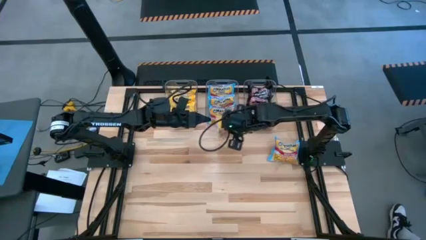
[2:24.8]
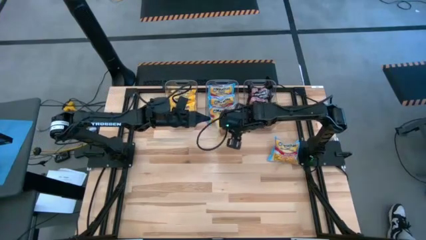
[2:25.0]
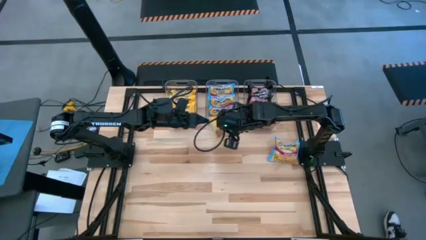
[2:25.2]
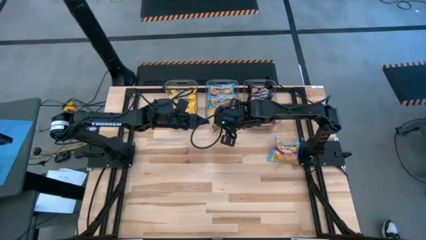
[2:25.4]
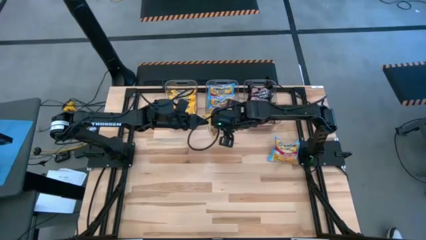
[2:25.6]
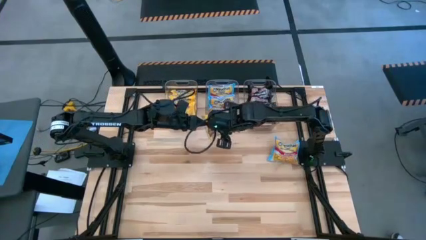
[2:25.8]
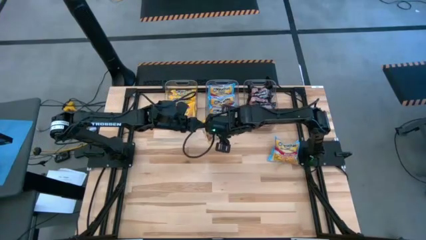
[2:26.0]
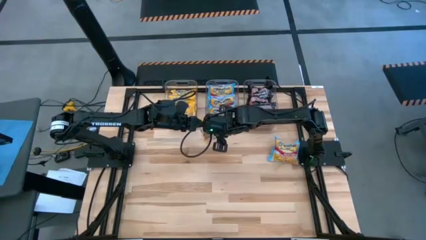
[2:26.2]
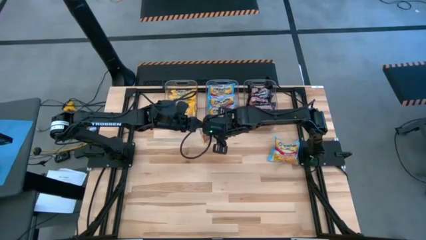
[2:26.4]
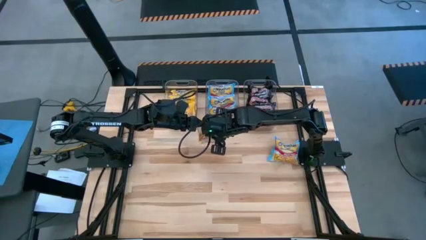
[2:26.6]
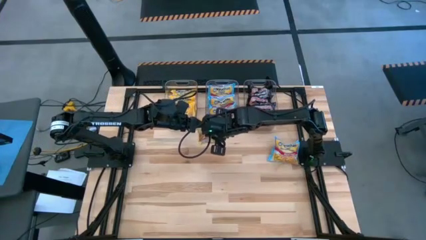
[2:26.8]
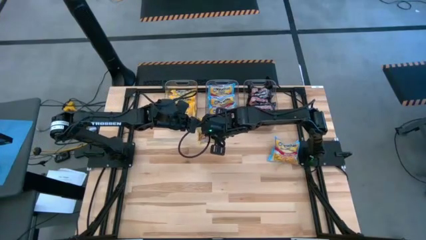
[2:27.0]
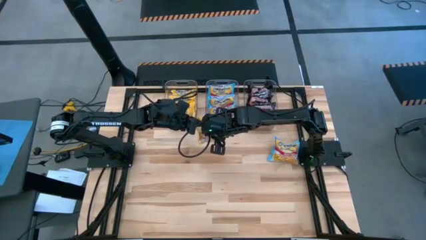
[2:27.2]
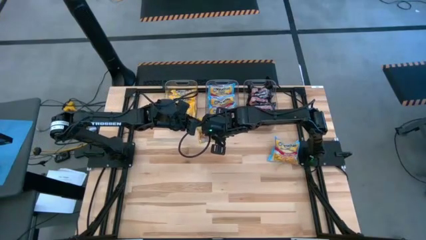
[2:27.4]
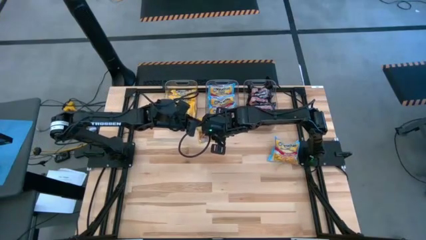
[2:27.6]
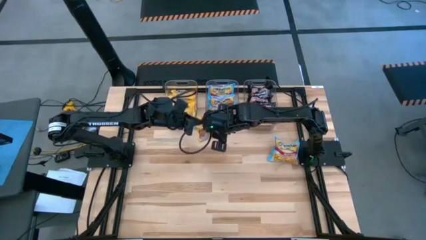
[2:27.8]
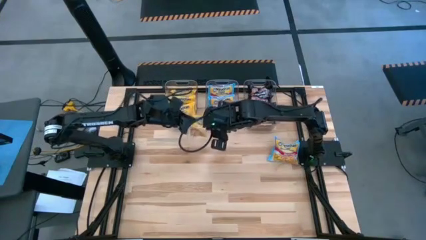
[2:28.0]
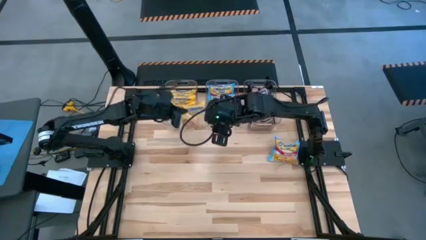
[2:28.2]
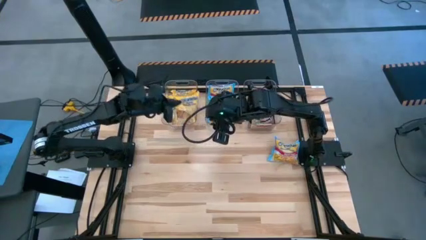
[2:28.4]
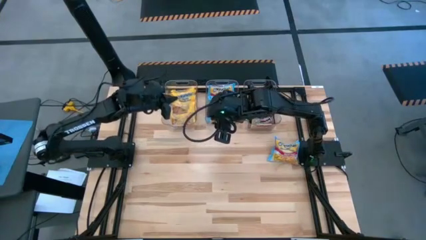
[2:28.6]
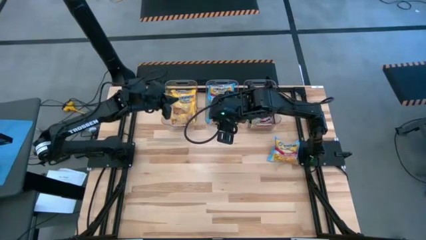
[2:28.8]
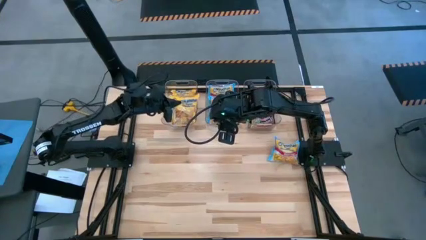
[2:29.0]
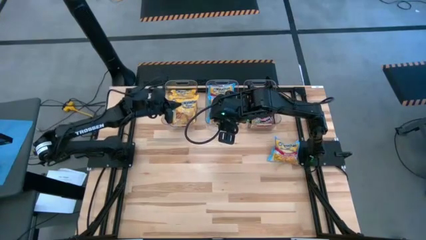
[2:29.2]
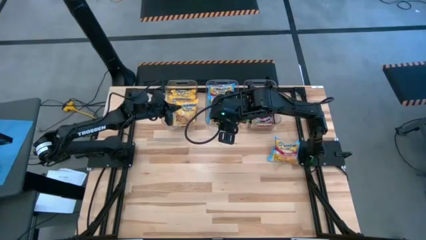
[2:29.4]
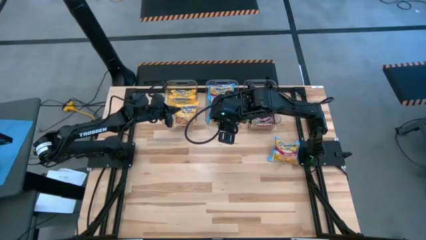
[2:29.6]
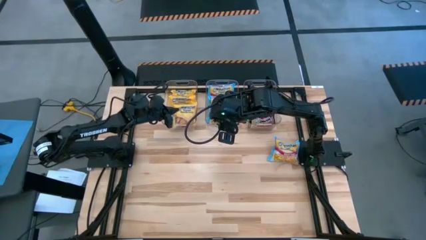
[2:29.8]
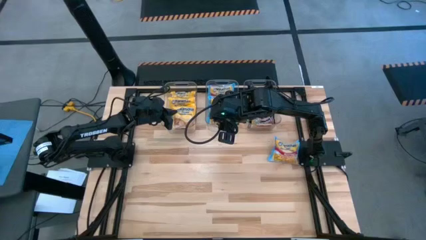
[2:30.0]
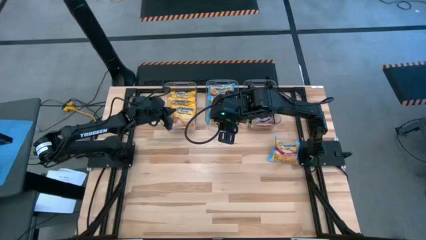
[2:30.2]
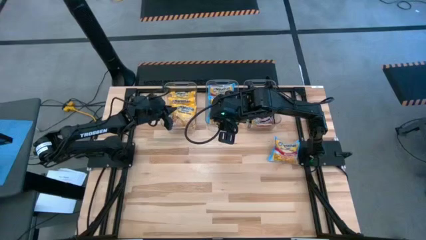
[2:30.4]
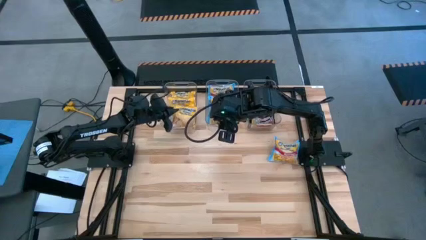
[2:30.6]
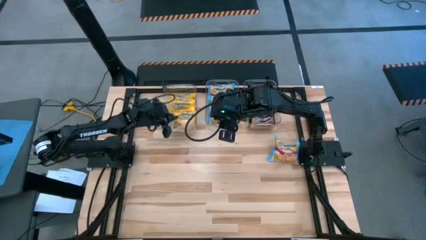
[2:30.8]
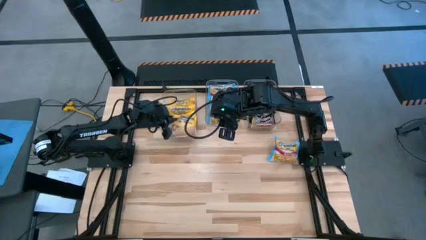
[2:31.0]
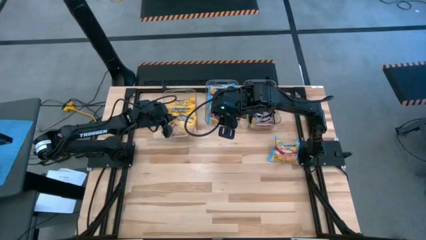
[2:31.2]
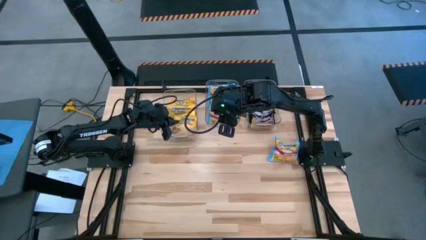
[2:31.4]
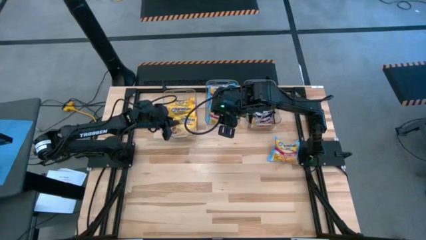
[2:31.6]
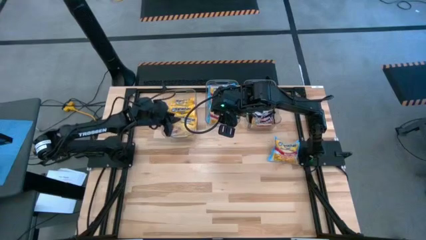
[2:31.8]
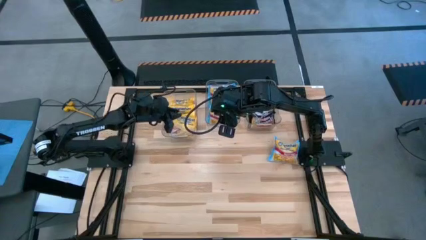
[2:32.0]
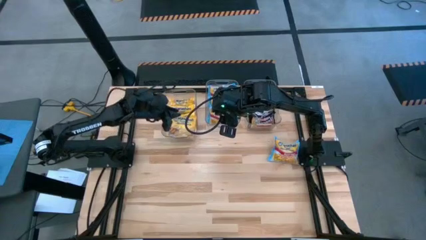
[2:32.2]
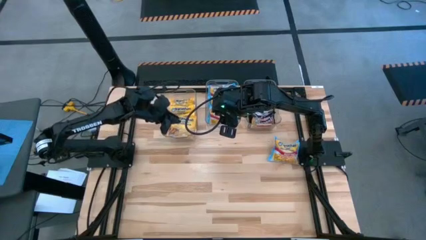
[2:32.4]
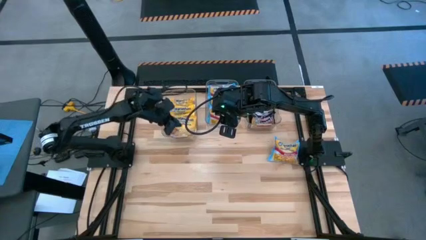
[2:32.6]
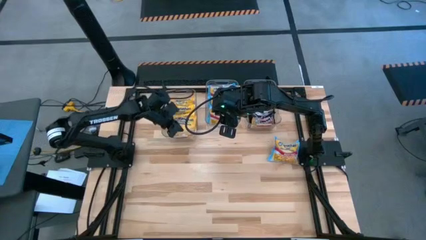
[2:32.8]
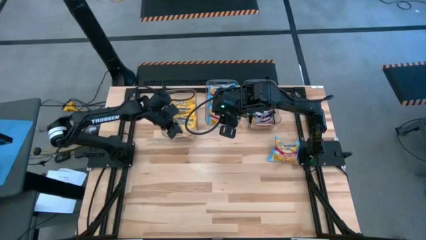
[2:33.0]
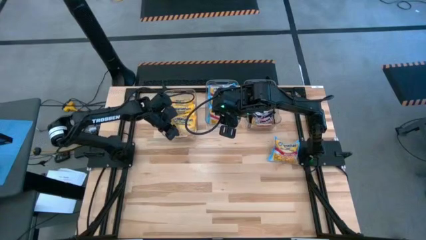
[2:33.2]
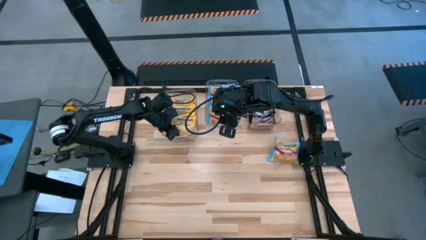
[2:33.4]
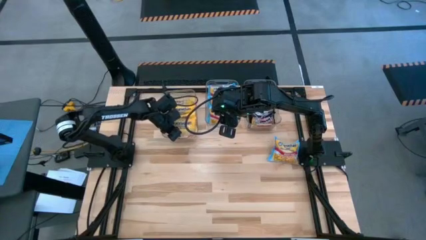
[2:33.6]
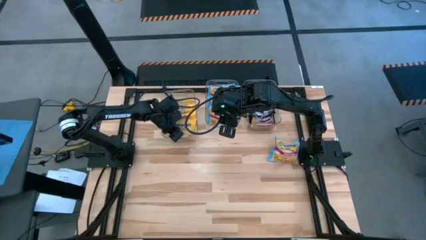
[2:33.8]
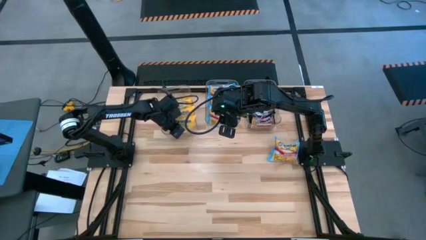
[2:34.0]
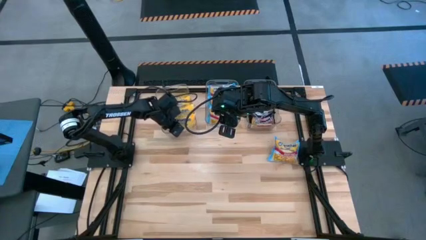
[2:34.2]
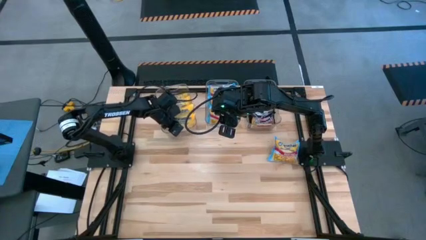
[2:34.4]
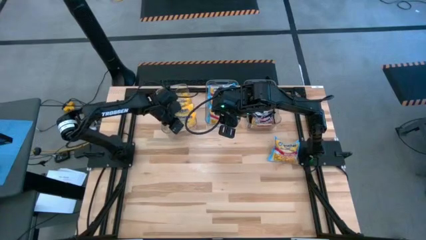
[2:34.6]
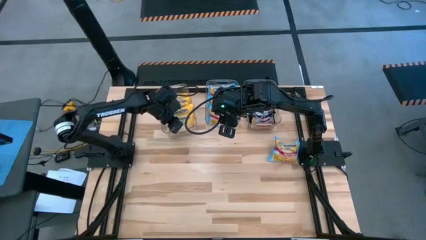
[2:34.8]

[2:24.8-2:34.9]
Task: Sort Maruchan noodles
Put the yellow noodle pack into the left transparent bin

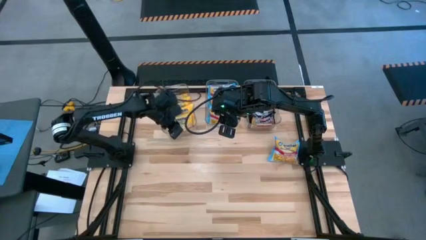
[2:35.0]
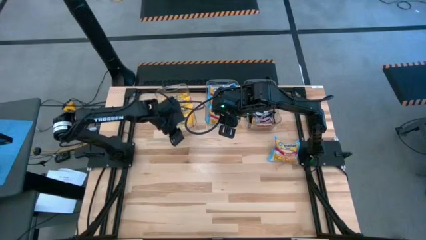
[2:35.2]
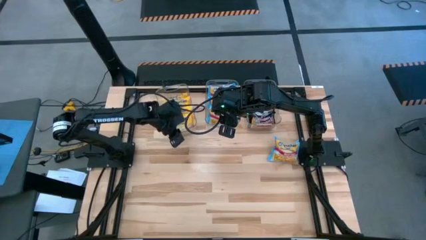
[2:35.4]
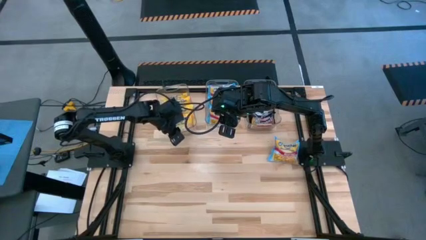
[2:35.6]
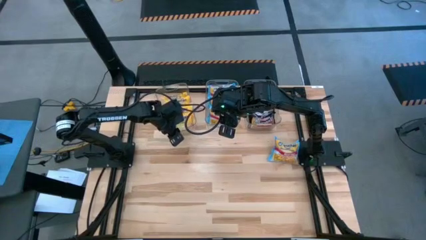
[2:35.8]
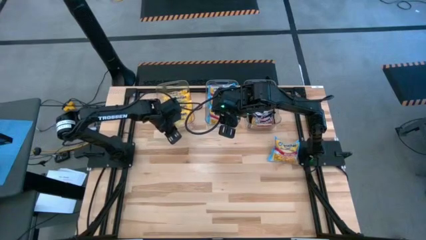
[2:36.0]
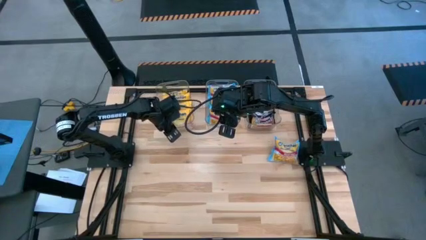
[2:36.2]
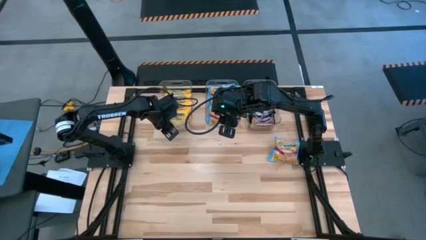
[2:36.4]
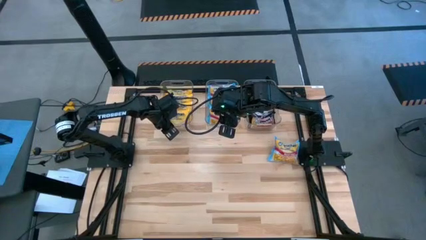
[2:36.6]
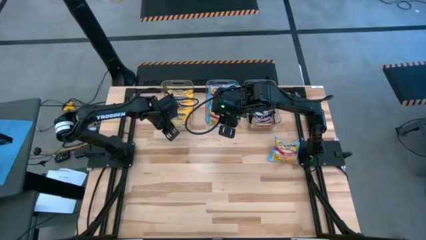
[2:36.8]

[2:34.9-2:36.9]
Adjust the left transparent bin

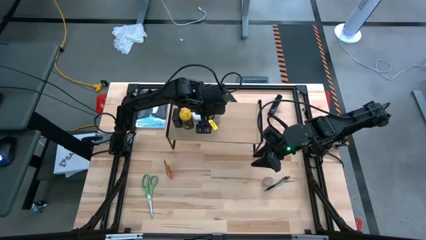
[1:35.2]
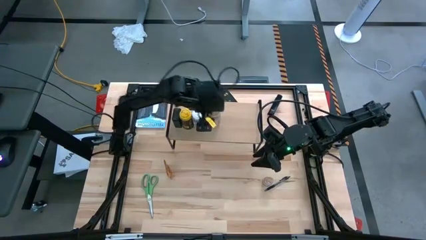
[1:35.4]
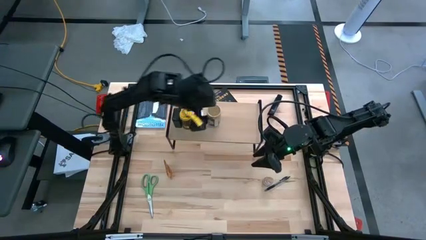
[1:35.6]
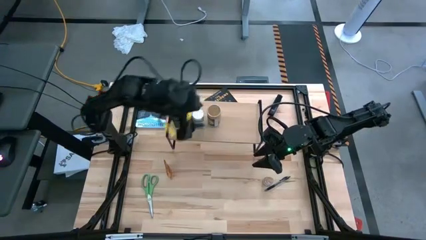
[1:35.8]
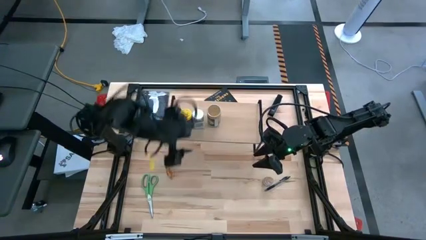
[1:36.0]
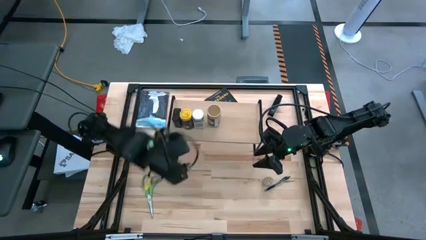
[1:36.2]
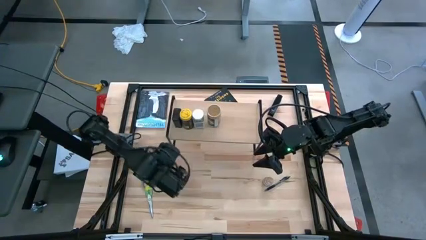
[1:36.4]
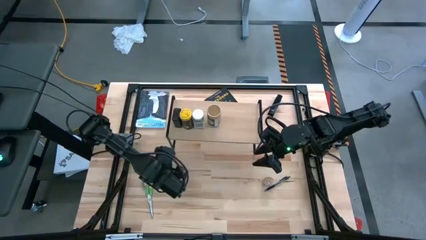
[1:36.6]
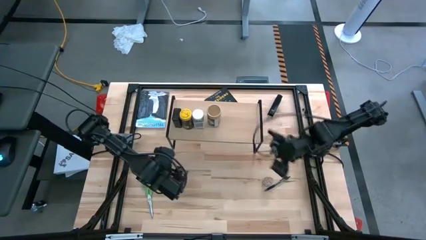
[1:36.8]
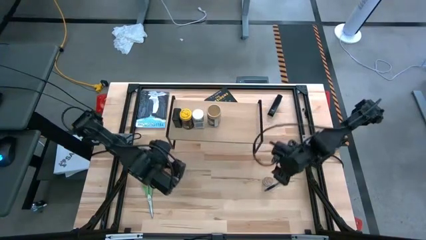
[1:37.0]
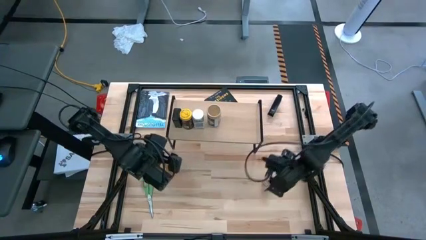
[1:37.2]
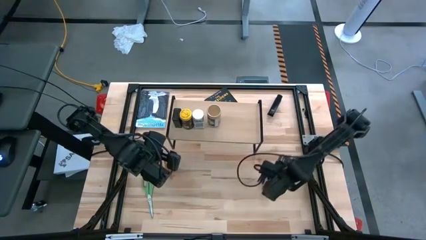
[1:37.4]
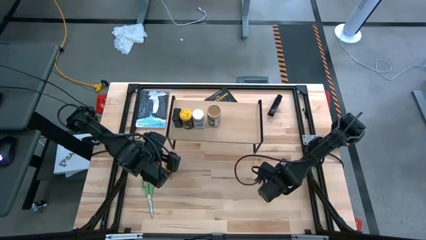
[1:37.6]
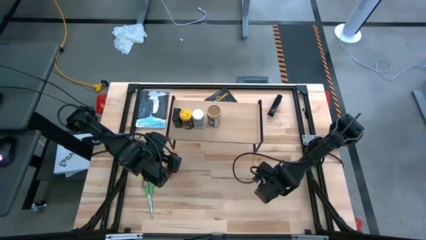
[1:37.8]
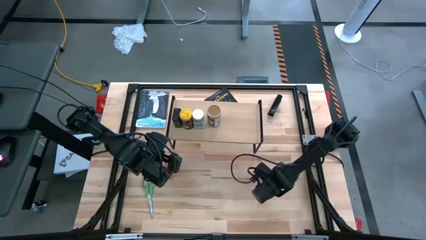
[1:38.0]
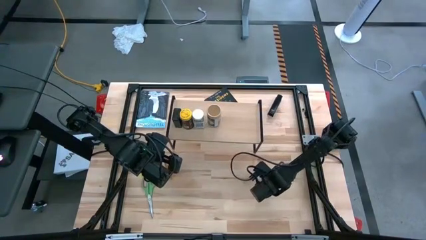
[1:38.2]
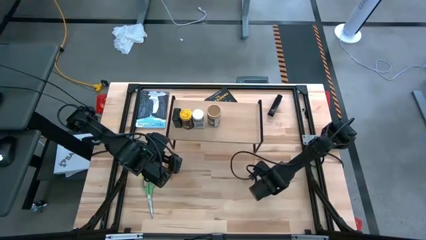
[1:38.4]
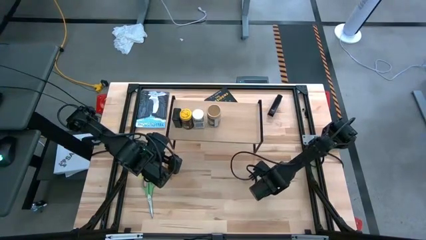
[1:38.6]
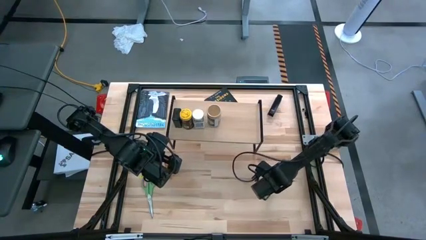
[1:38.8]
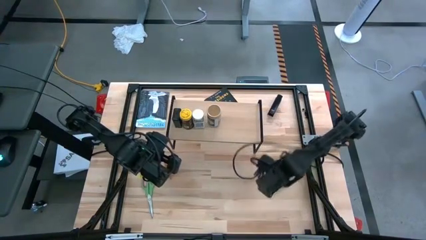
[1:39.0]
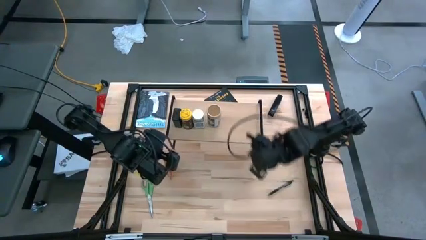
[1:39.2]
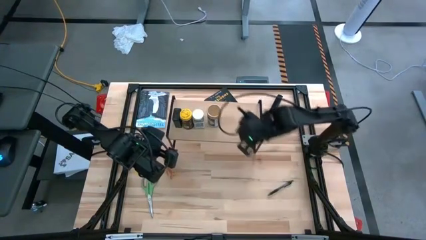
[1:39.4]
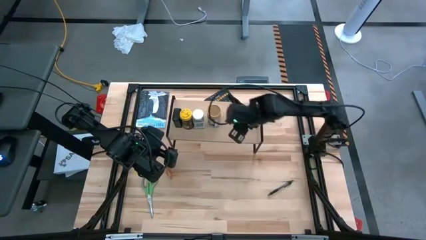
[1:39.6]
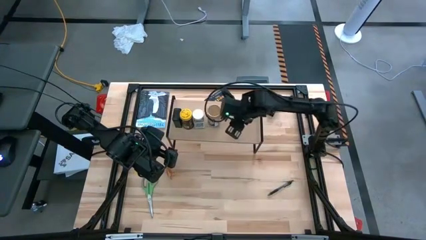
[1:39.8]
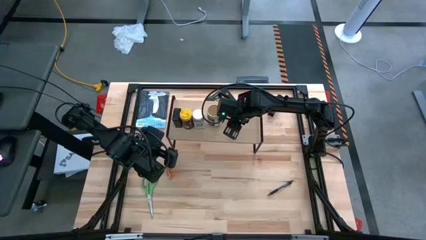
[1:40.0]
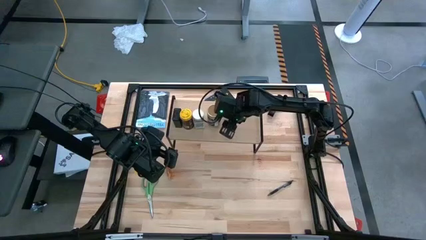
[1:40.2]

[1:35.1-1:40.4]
Task: Shelf spices
Put the brown seasoning bottle on the shelf
